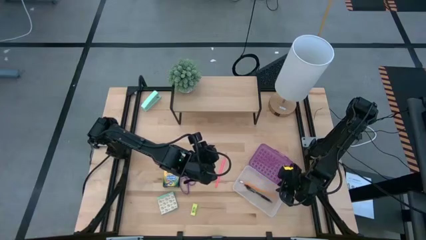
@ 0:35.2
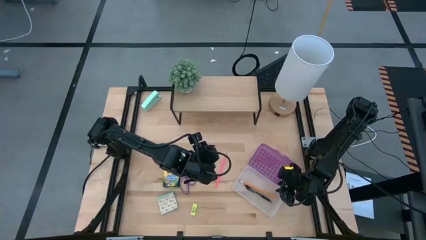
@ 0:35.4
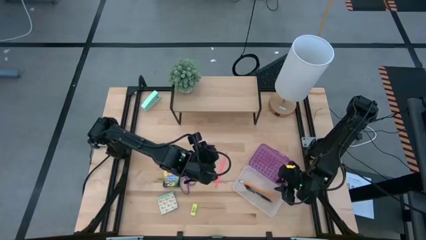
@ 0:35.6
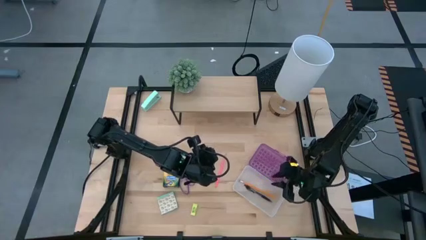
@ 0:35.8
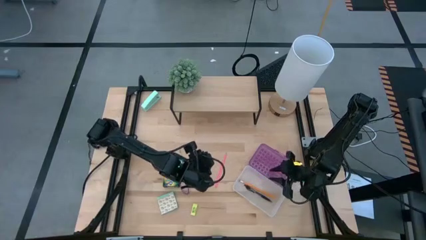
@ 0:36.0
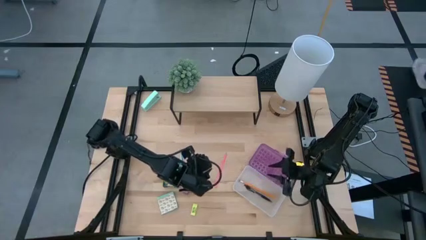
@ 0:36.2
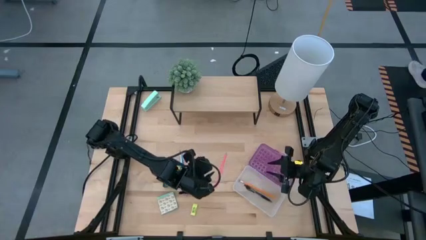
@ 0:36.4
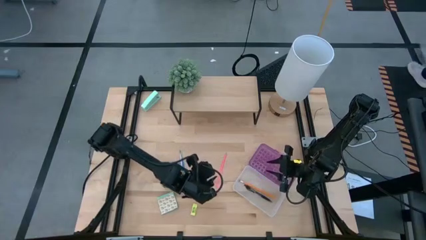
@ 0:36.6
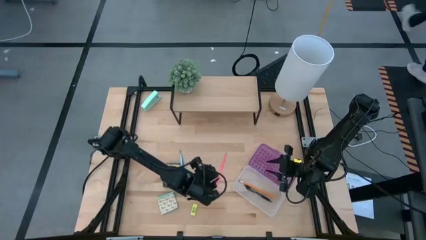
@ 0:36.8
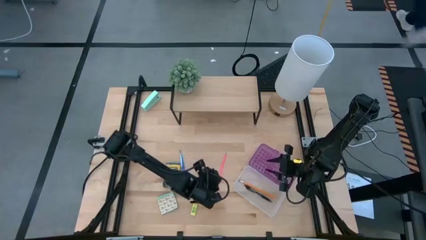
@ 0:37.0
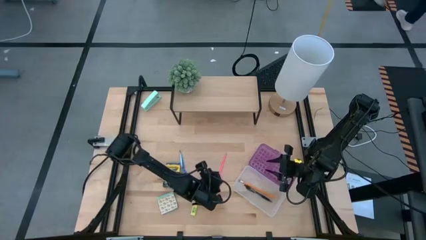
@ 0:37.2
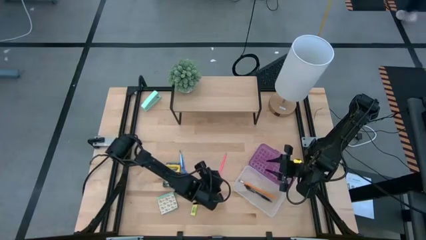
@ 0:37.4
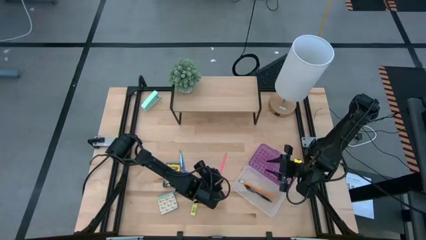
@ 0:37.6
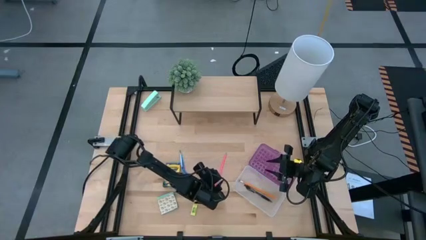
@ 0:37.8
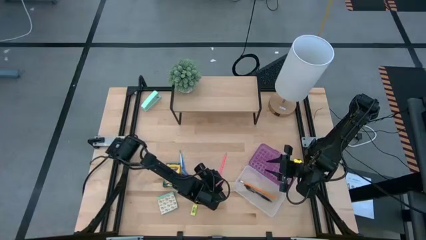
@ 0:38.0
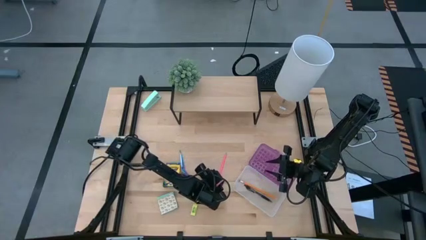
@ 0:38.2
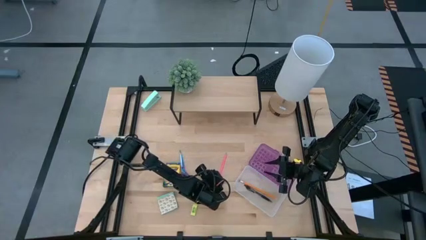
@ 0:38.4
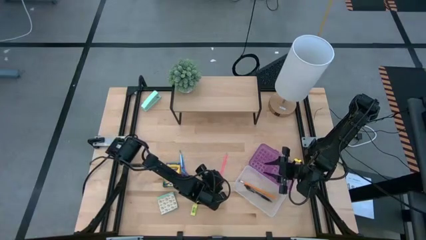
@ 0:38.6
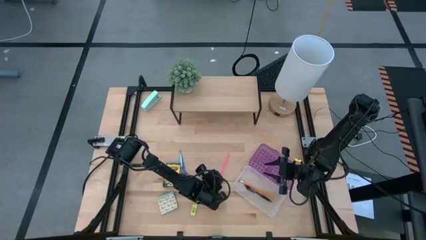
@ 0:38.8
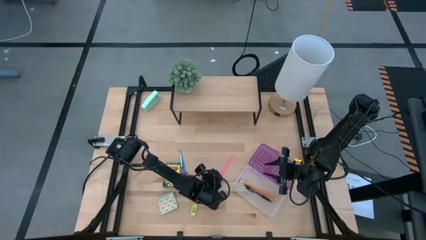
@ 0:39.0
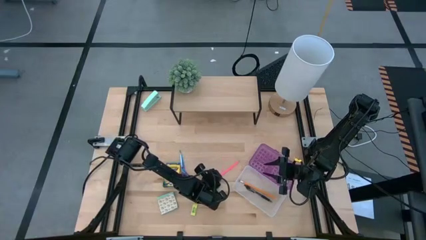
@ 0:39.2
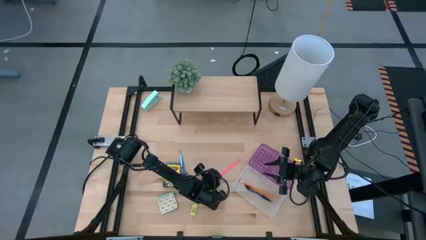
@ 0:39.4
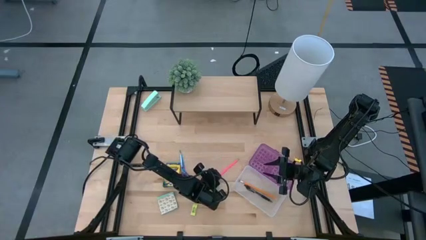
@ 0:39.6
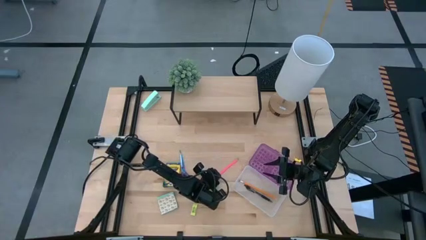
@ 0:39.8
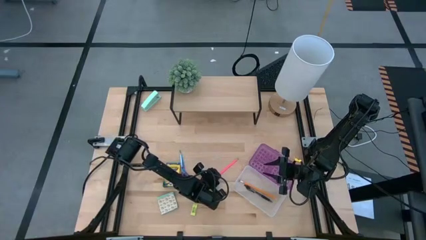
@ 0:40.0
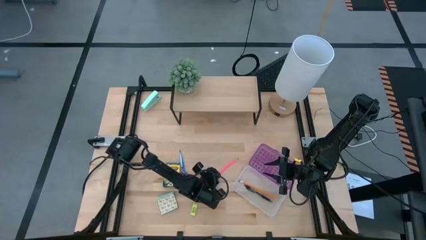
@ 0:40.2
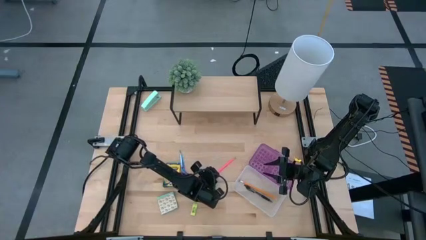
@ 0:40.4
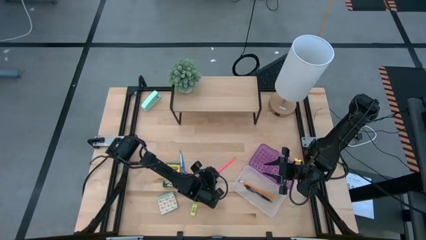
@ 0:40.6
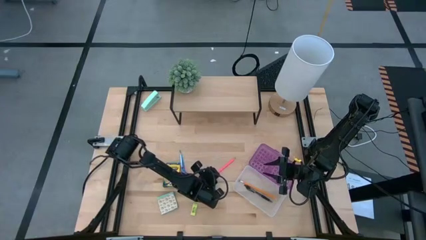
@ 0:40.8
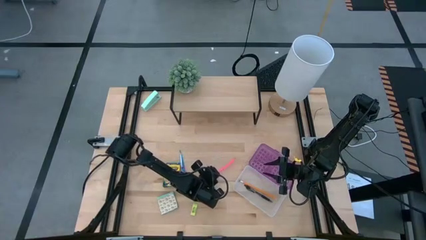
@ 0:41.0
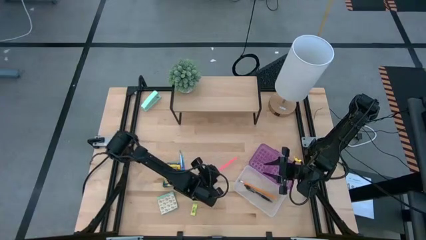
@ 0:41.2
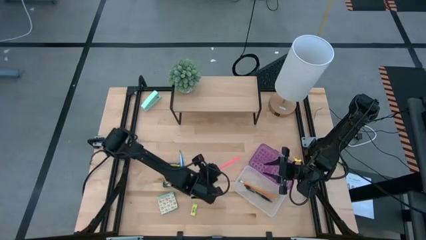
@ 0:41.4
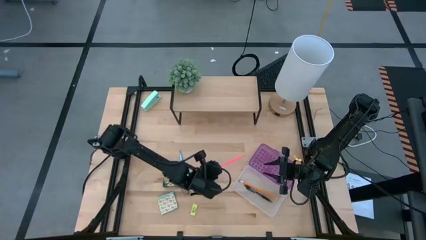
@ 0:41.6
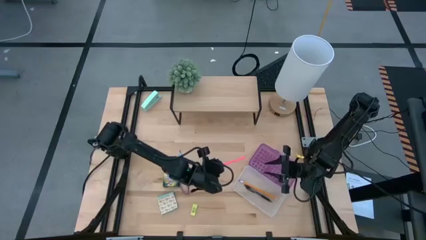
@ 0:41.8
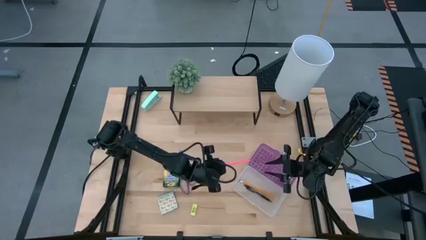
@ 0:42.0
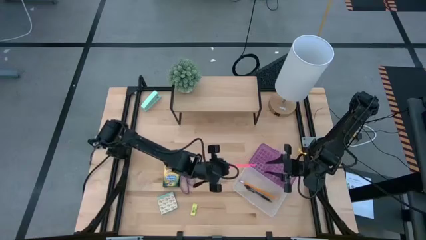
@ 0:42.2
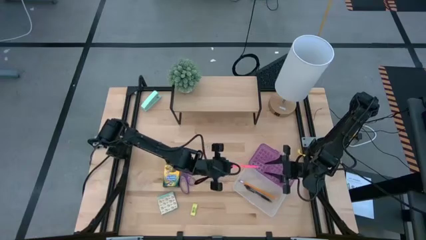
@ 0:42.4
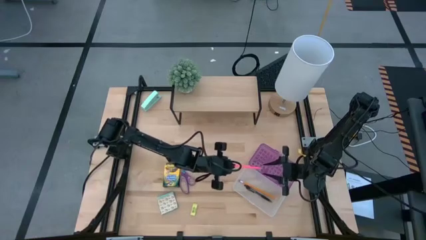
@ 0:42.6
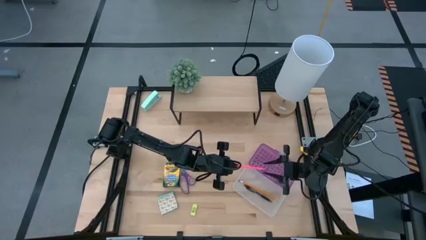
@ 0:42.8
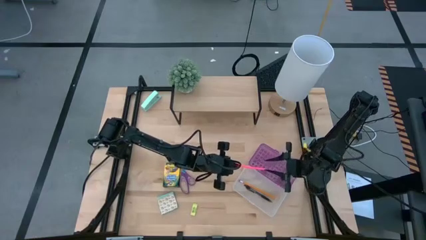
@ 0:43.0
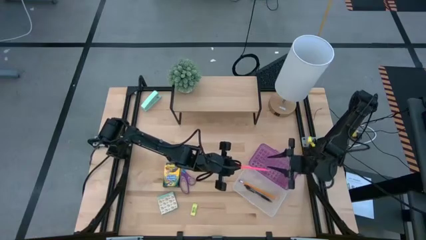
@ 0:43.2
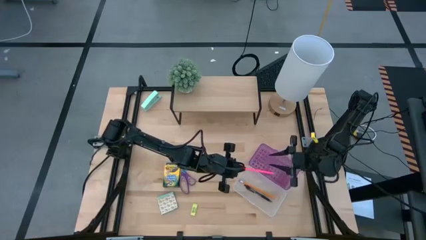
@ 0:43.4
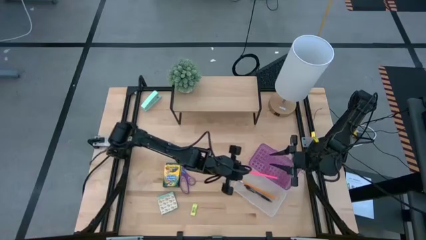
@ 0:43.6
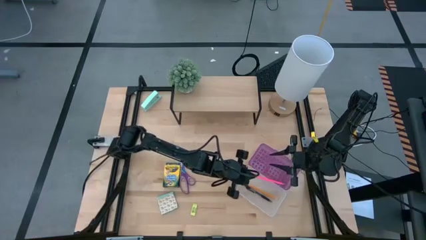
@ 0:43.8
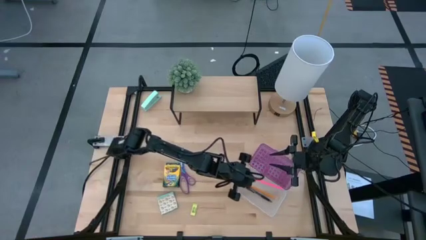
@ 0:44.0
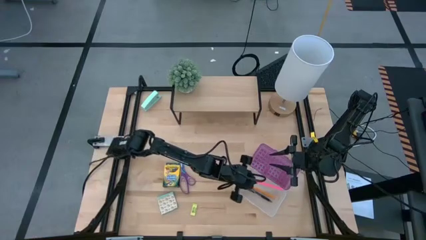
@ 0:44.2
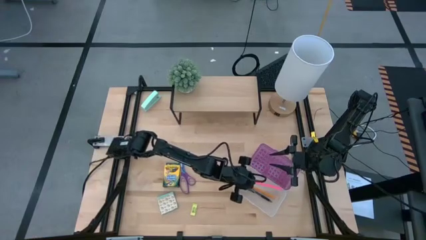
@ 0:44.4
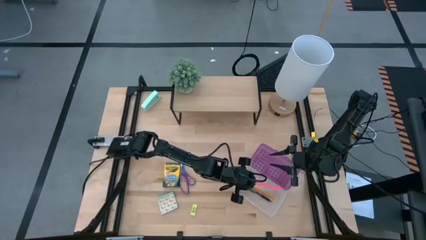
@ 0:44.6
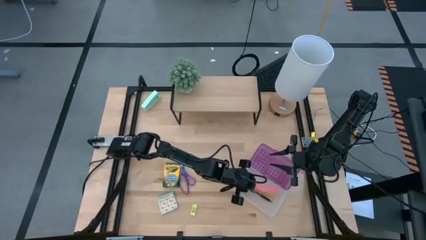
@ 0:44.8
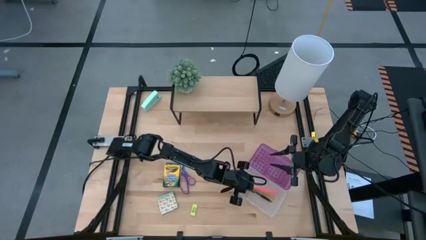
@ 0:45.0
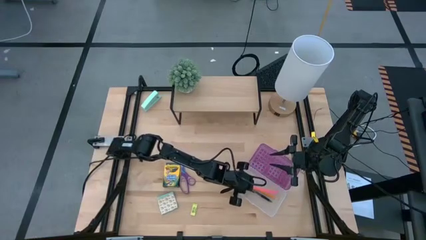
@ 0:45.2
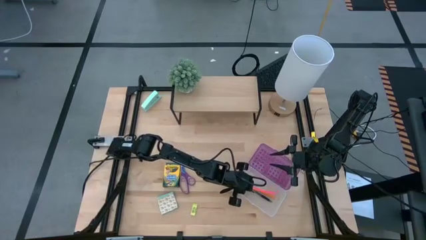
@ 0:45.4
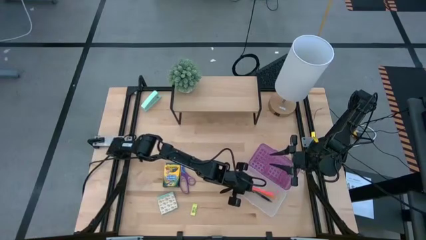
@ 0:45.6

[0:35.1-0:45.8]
Task: Pack school essentials
Put the pink pencil into the purple supply box
